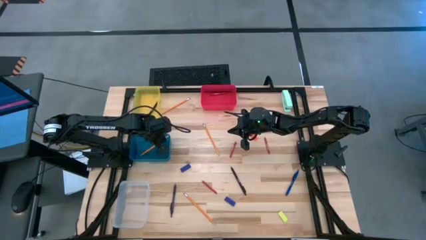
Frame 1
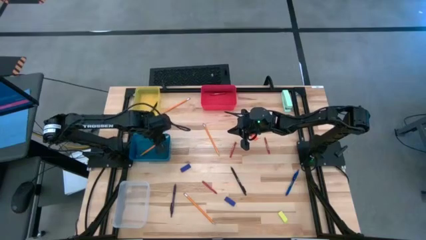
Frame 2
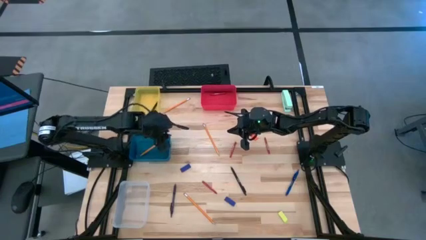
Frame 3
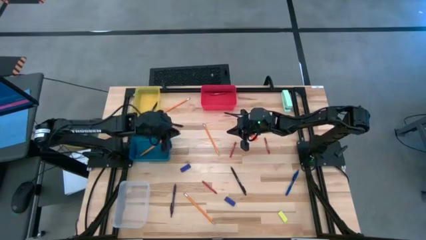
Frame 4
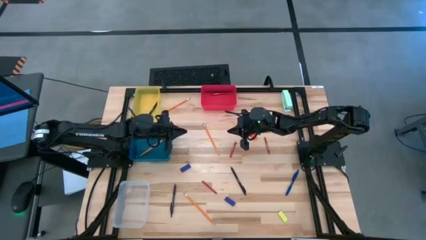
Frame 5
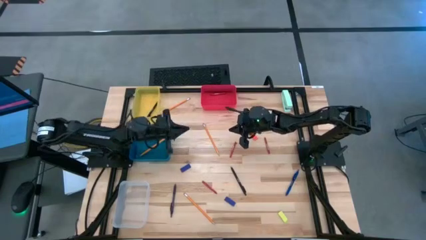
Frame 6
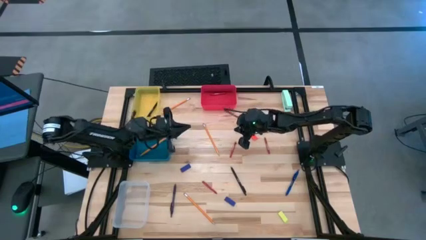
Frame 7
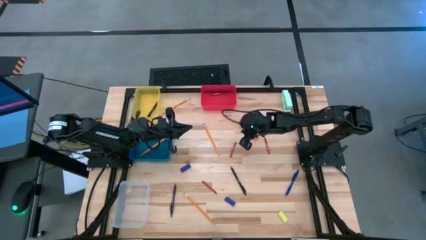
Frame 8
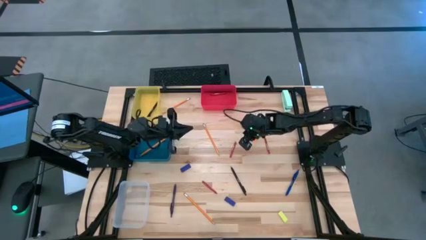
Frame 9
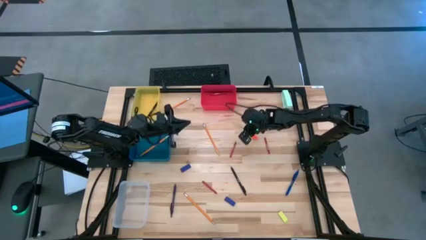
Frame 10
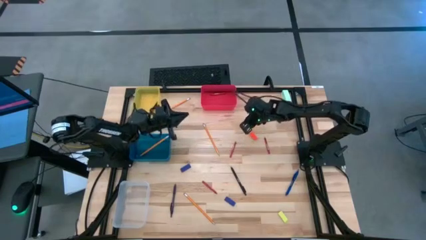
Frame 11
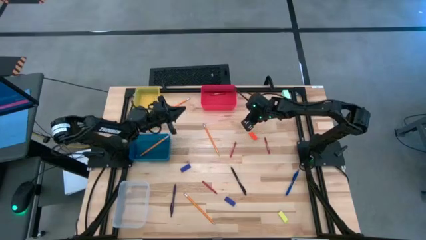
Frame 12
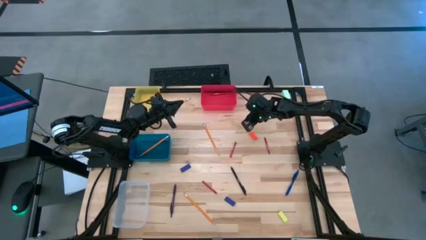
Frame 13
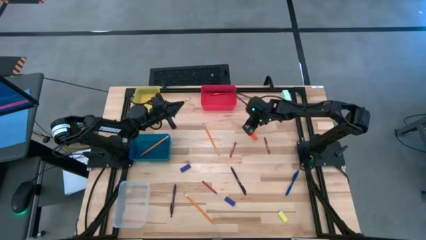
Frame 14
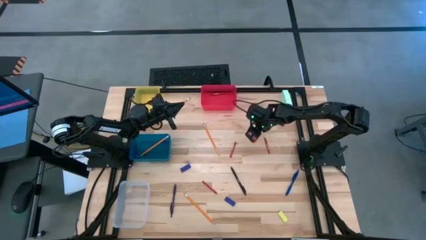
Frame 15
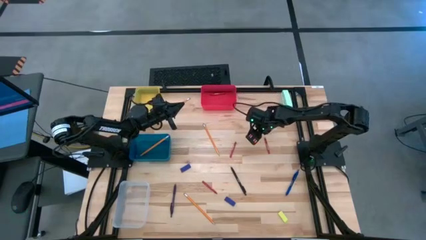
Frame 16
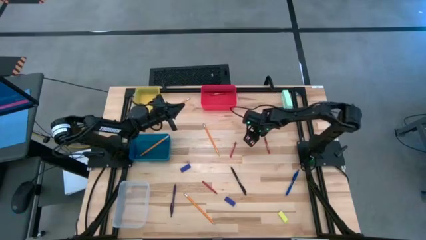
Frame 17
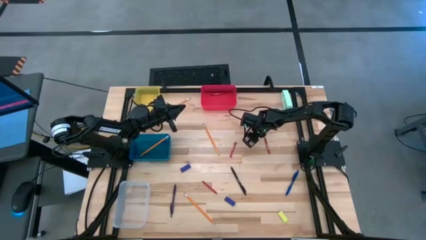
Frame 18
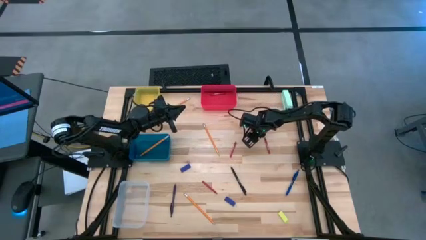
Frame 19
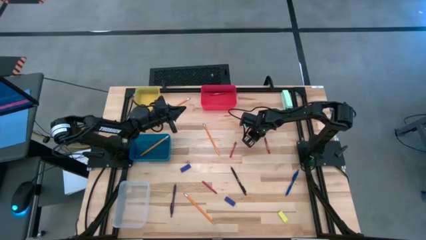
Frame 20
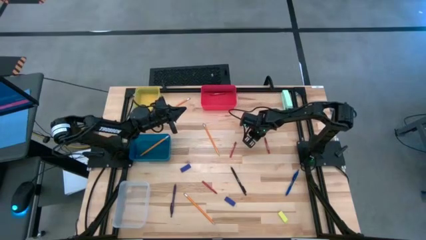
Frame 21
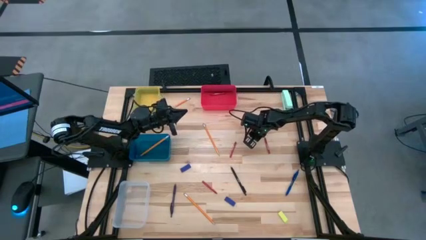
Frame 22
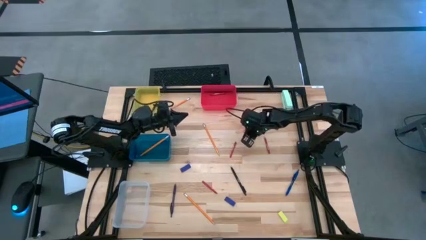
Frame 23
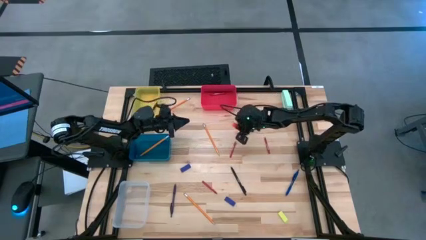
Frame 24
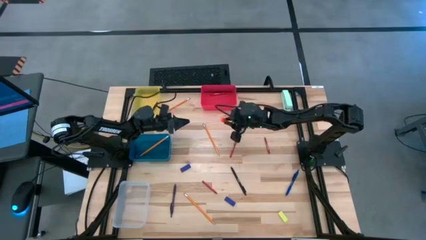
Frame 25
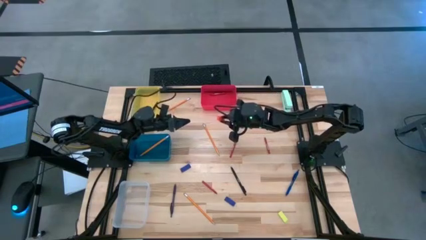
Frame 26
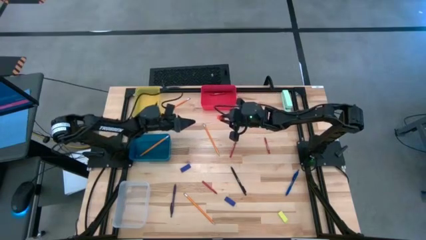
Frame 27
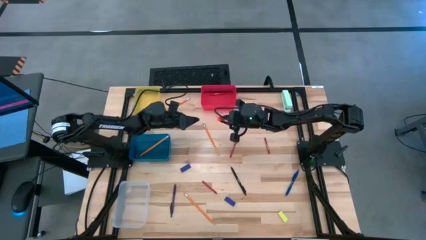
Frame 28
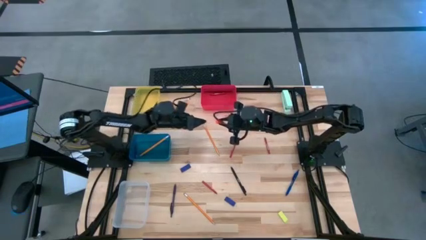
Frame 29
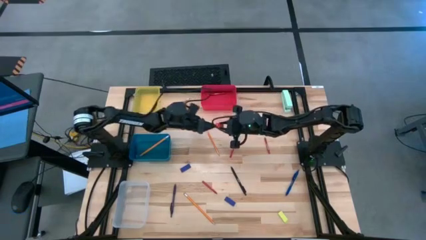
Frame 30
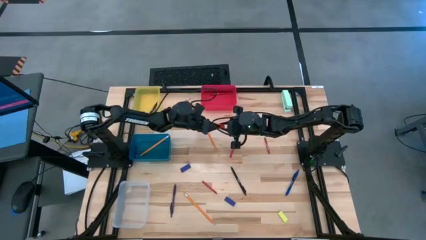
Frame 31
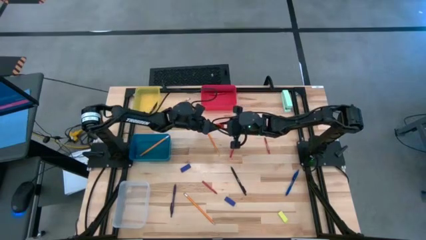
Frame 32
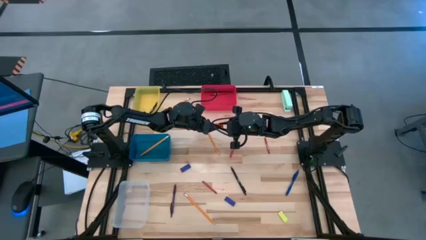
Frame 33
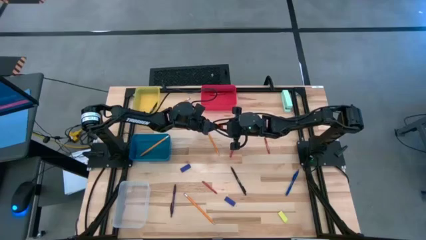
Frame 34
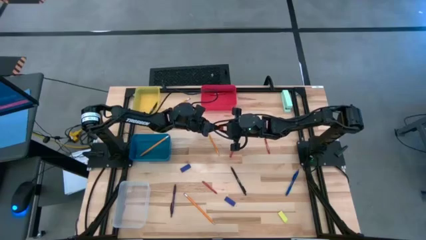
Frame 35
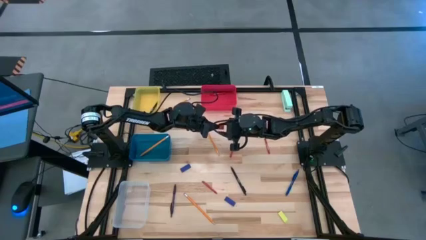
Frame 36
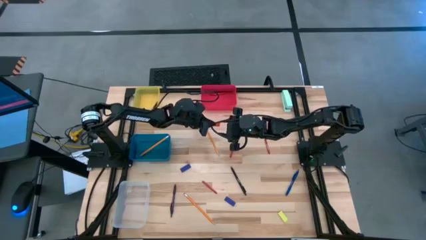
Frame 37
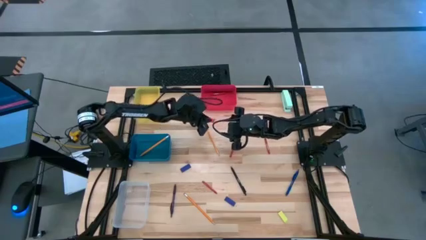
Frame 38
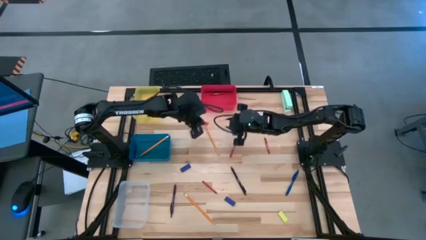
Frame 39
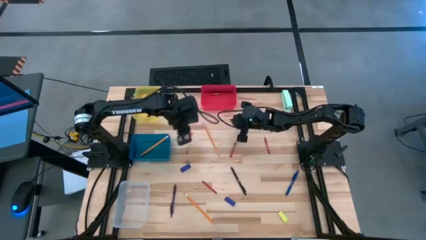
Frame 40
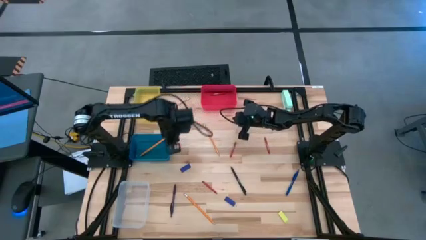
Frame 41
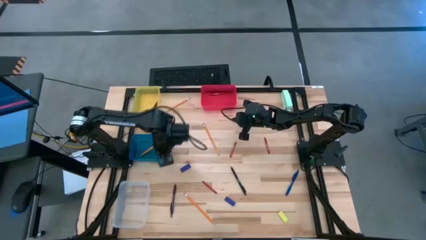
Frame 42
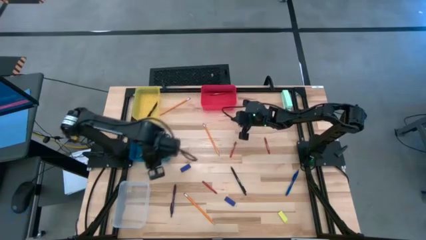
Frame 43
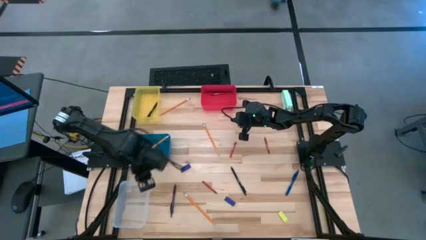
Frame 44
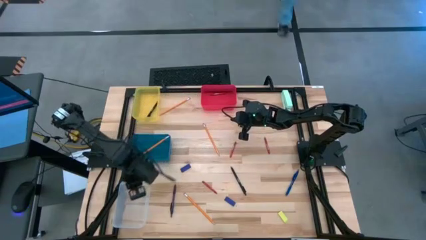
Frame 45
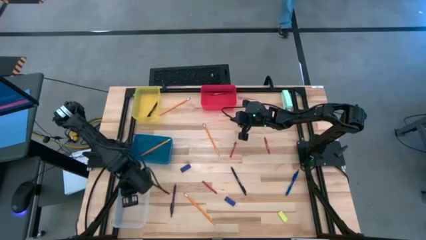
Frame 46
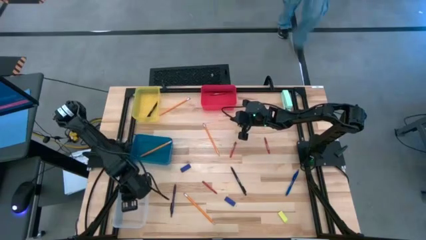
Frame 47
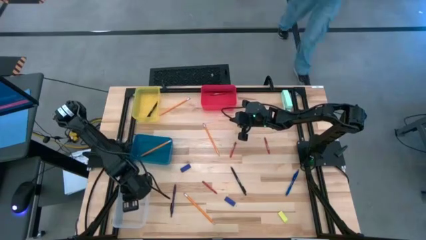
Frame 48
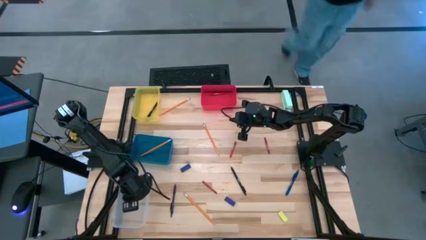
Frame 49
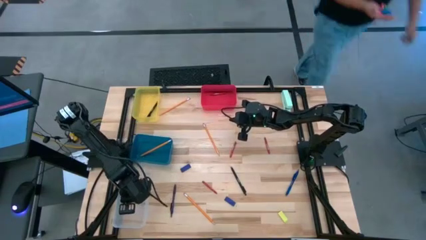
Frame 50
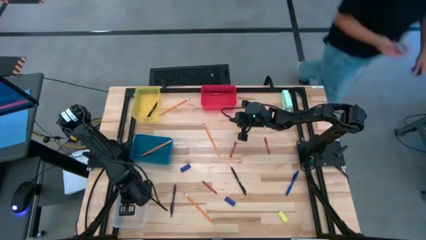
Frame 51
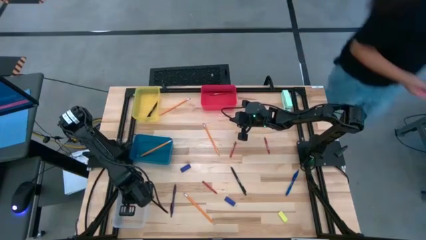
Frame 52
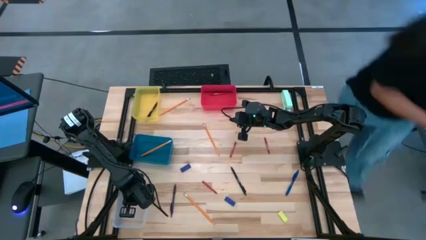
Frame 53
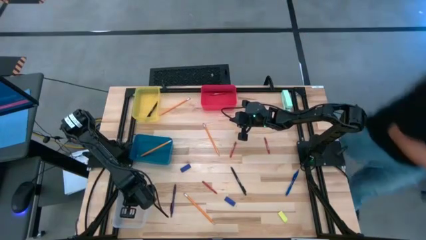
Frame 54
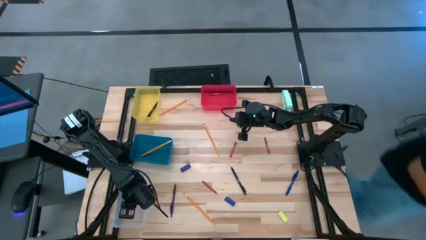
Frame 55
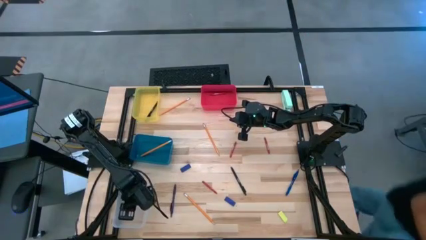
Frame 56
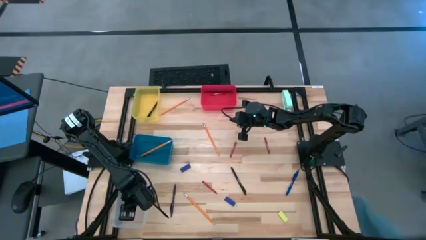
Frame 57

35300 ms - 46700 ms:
Task: Sort crayons/erasers/pens/pencils in bins
Put the orange eraser into the transparent bin

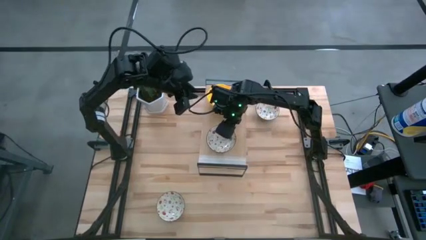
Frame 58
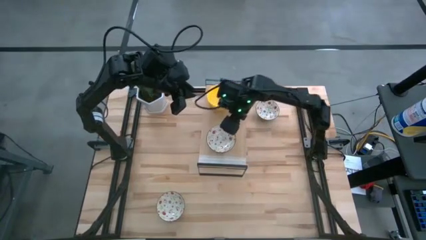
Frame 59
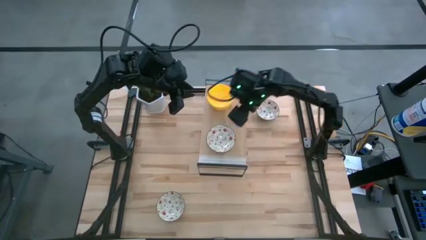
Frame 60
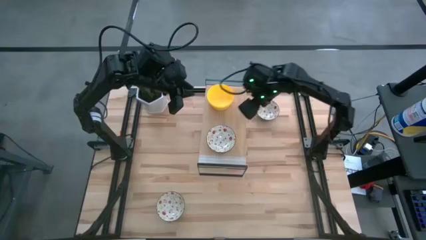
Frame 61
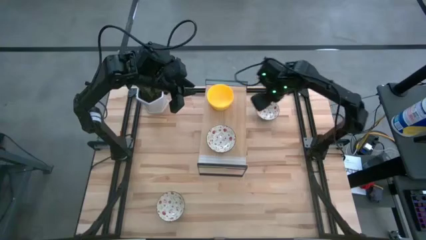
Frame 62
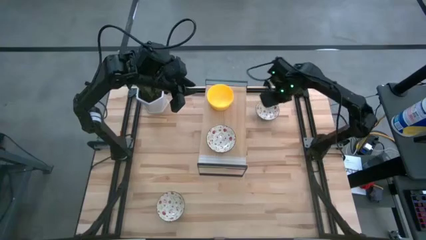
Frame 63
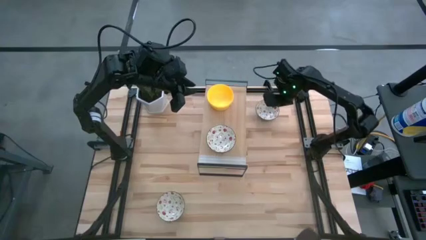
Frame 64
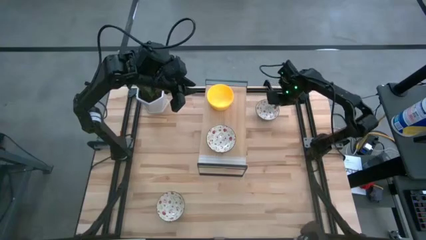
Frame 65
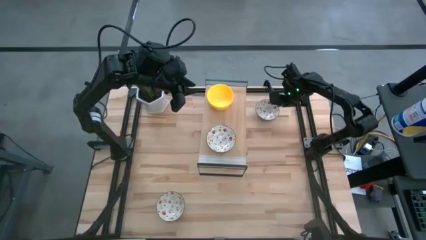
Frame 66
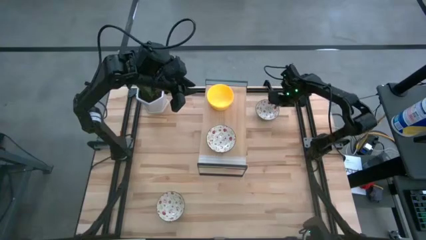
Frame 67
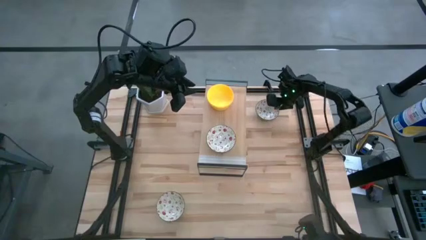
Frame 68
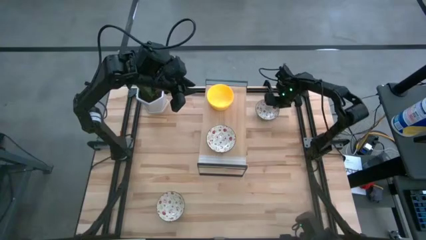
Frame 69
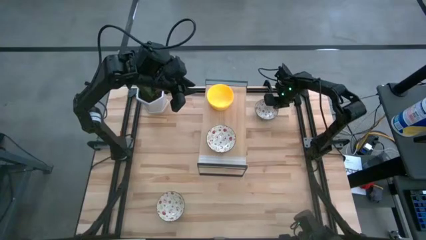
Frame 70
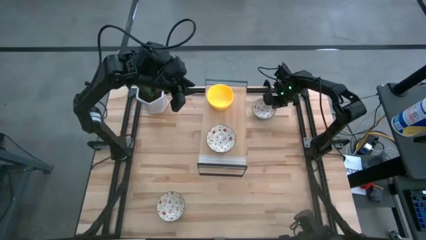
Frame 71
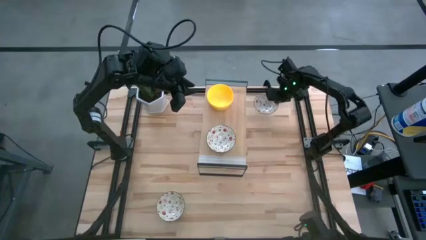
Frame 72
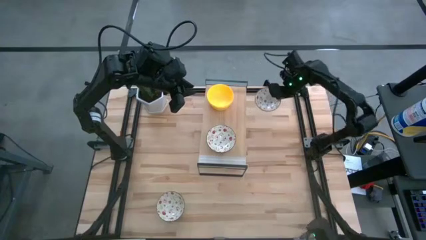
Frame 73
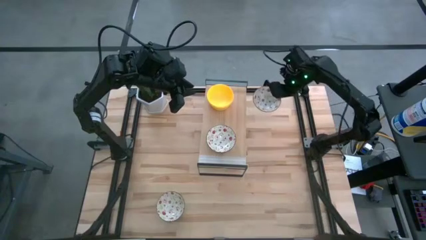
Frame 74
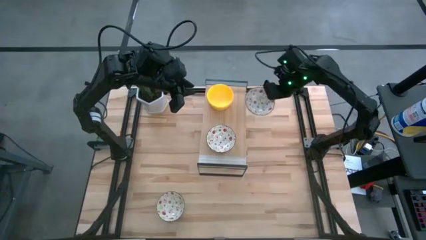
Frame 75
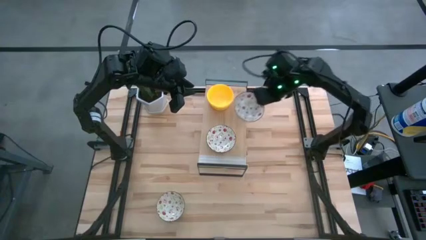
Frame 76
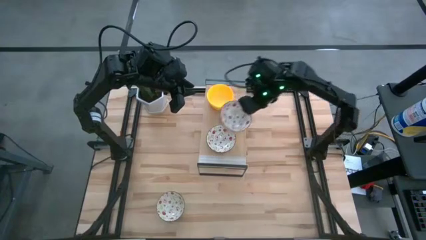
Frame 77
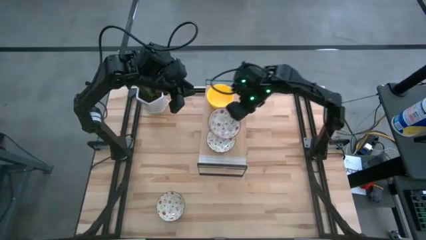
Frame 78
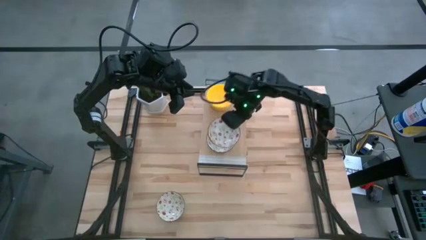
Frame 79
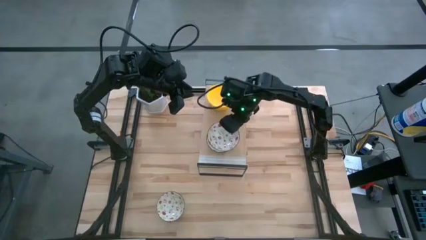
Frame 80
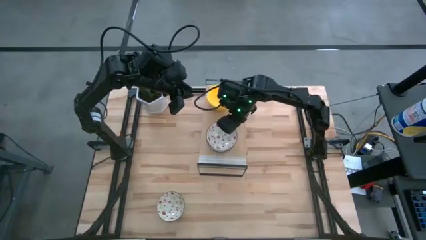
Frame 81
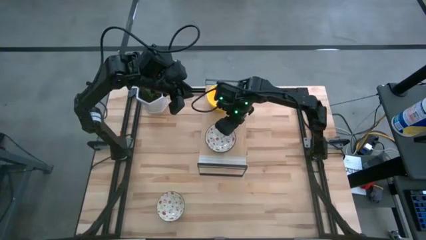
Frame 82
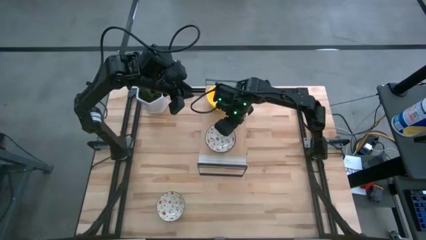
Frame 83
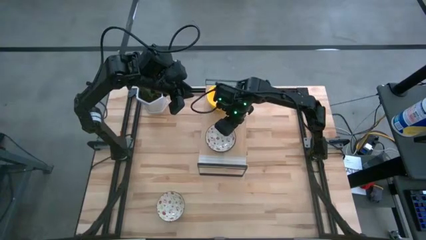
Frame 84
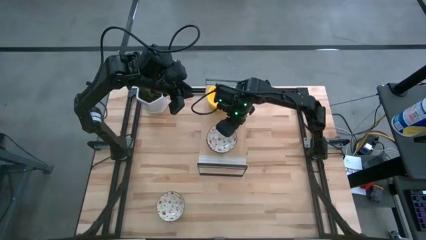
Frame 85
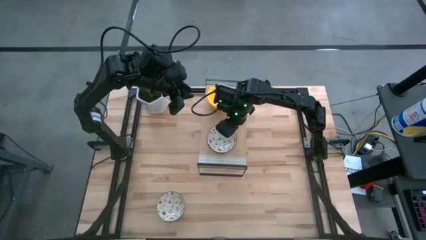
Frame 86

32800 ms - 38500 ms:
Task: Pick & Place Mini bowls
Stack the top white bowl on the white bowl on the shelf
